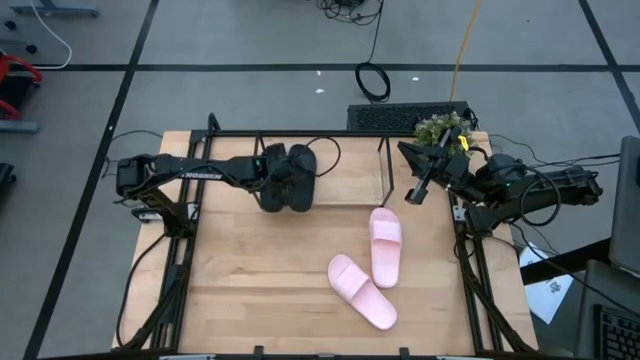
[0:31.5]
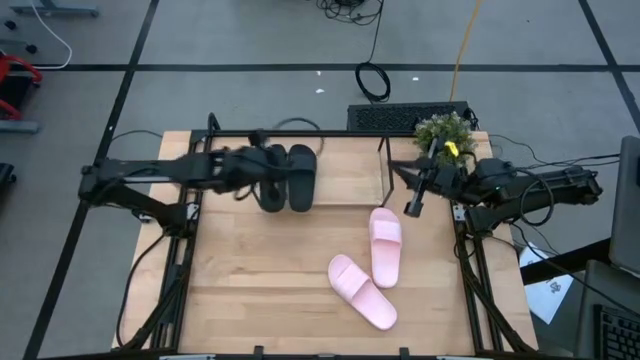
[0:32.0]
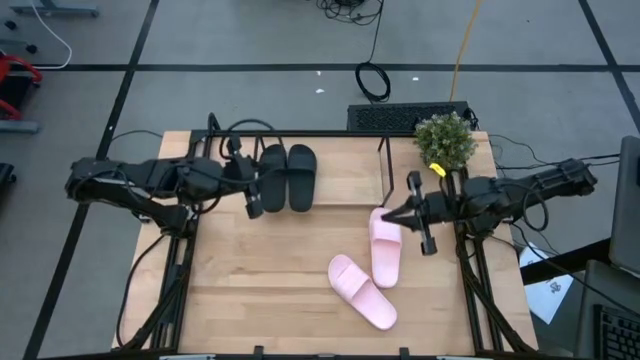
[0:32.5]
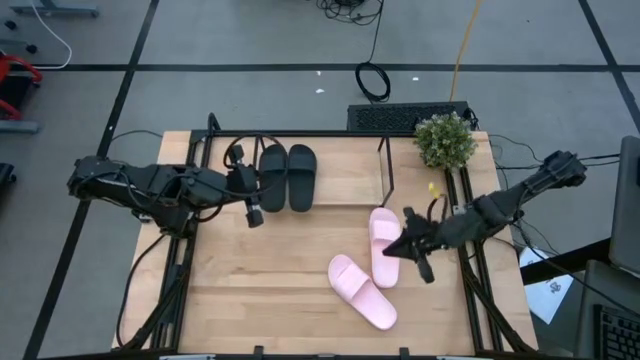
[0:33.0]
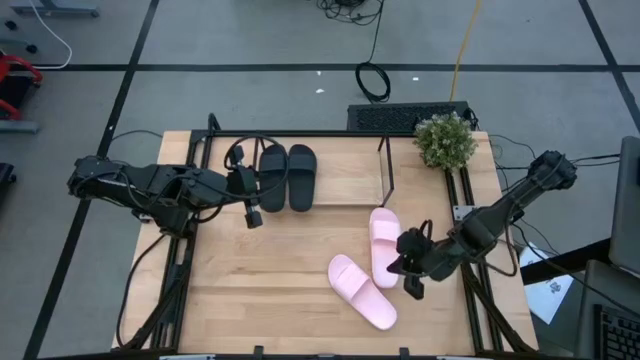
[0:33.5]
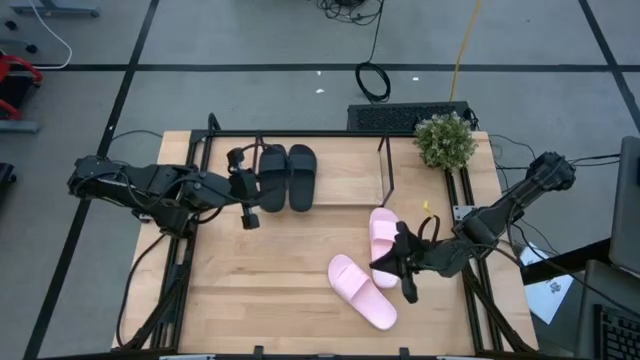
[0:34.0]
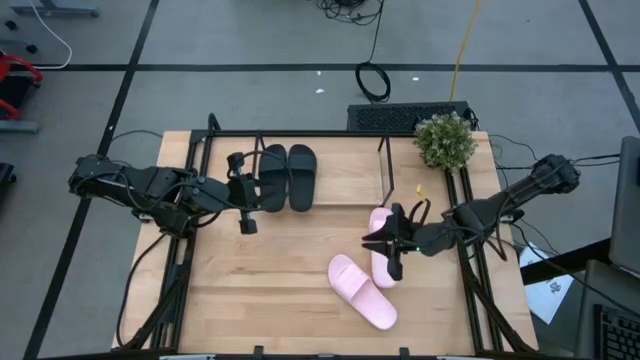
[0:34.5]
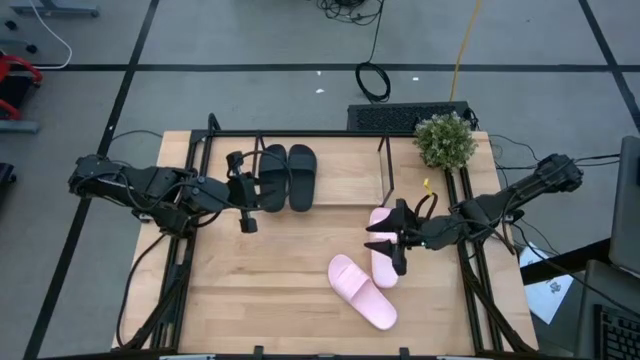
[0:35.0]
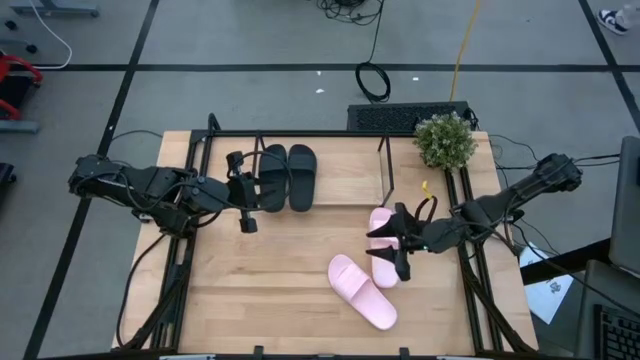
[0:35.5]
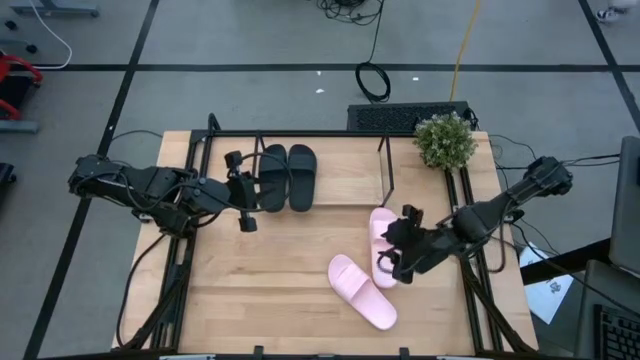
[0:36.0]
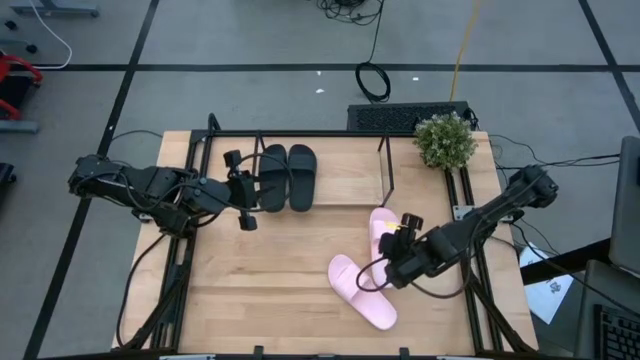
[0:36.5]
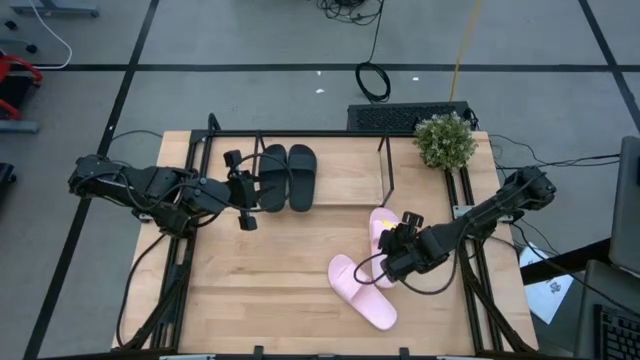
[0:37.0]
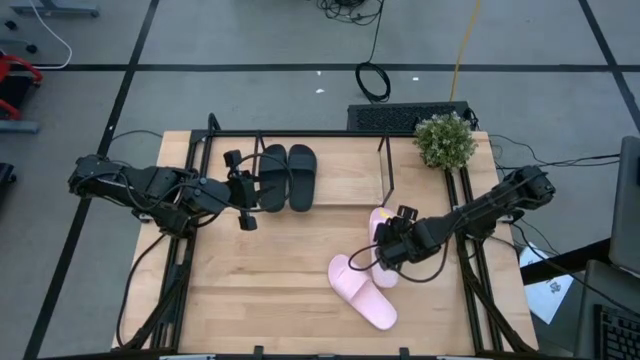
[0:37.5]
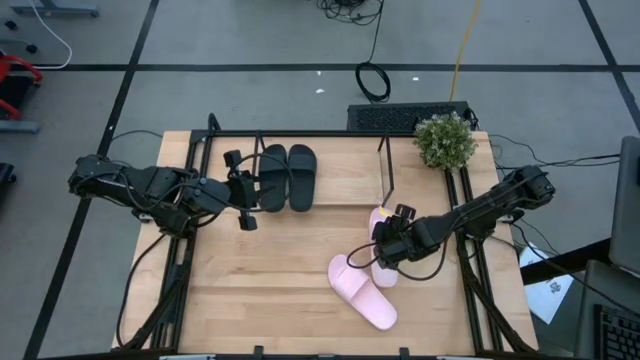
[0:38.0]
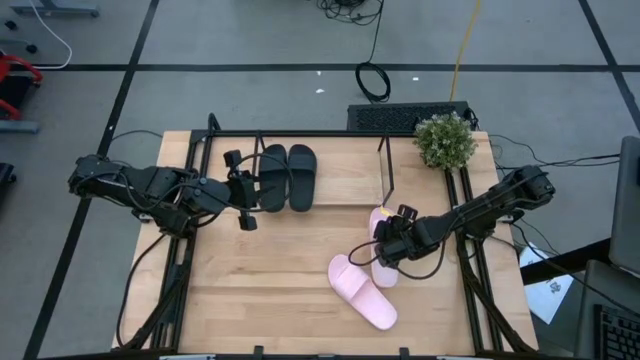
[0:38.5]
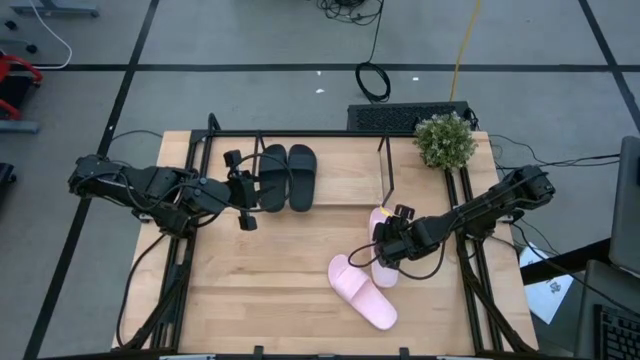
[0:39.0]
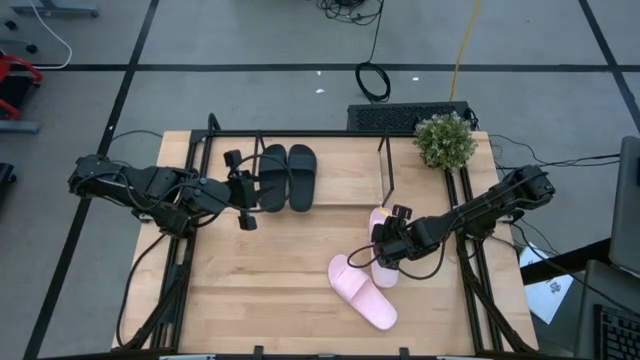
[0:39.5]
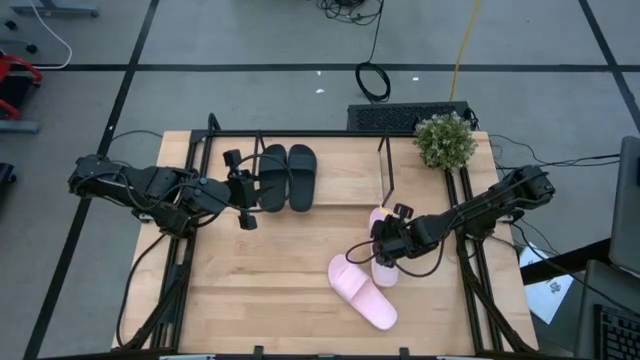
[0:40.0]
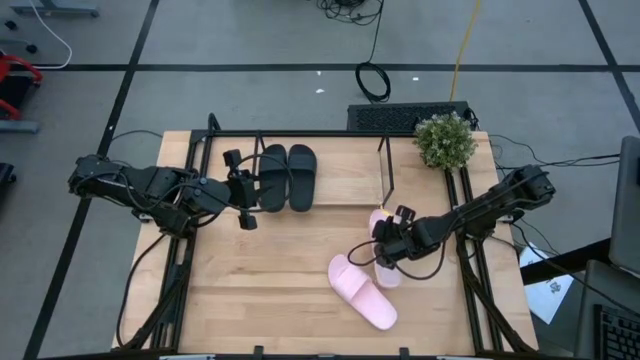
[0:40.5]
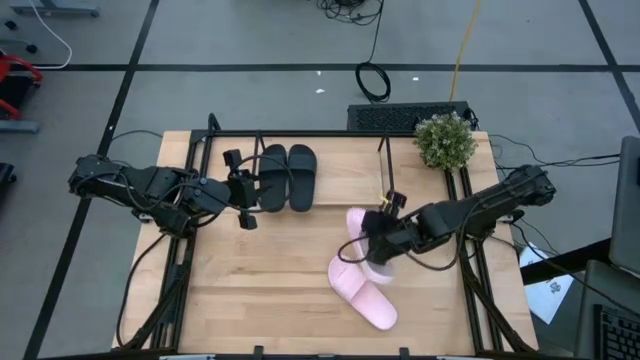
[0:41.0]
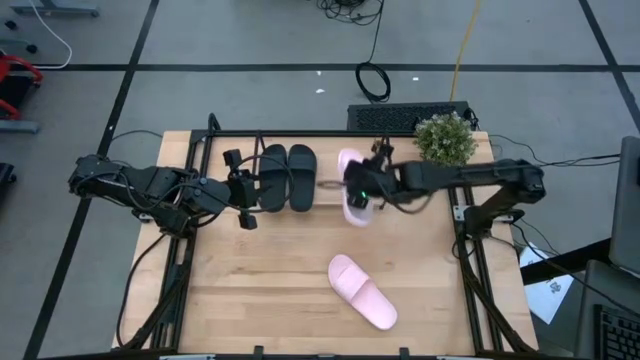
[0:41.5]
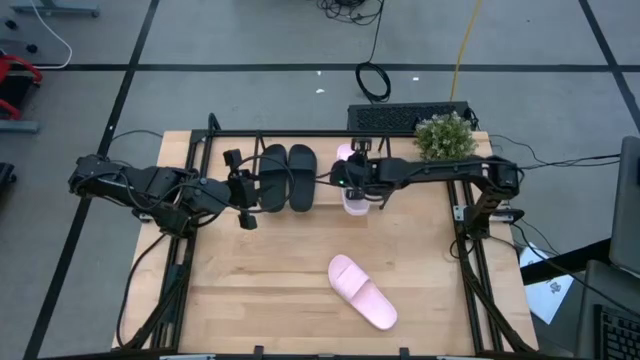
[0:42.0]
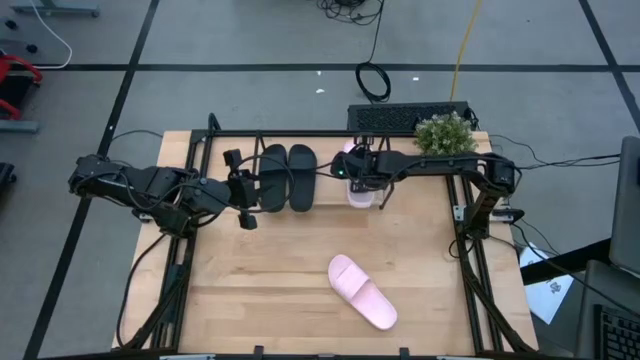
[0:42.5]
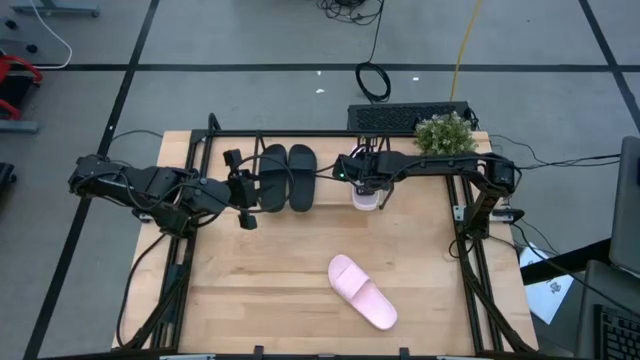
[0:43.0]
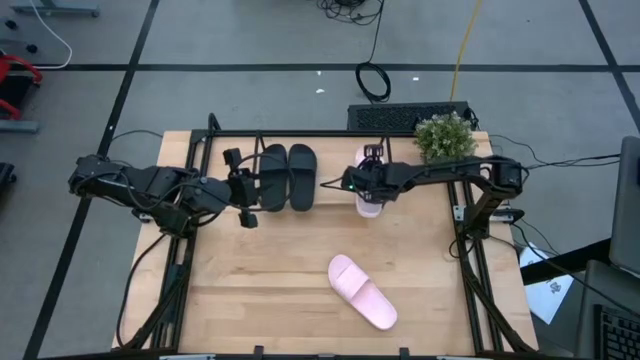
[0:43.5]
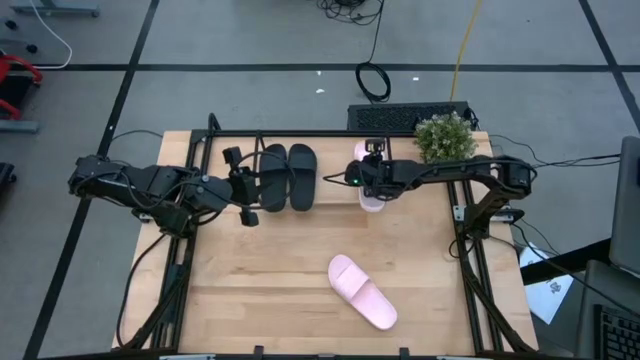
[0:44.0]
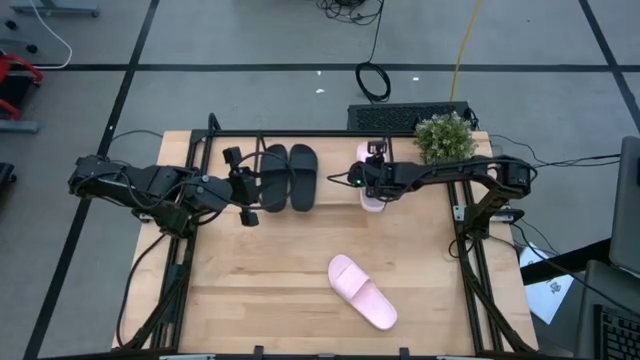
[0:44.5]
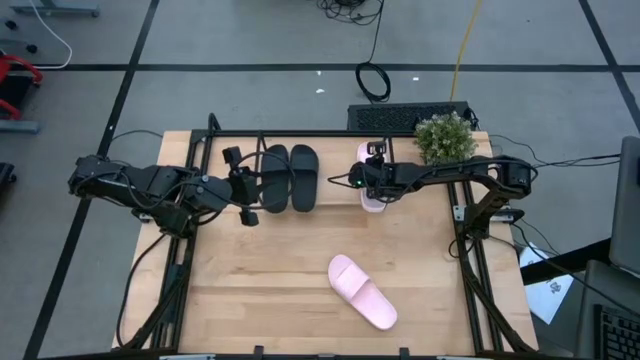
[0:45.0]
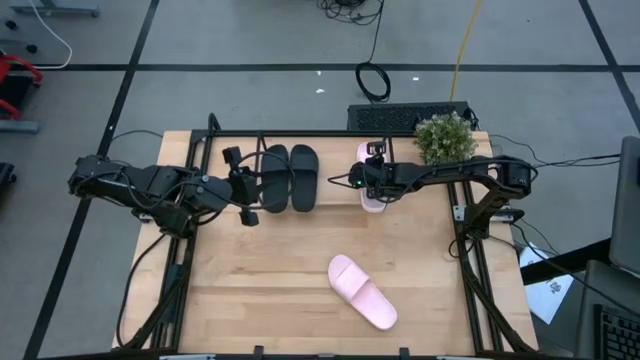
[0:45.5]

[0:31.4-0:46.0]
Task: Pick and place slides into the shelf
Put the right pink slipper on the shelf

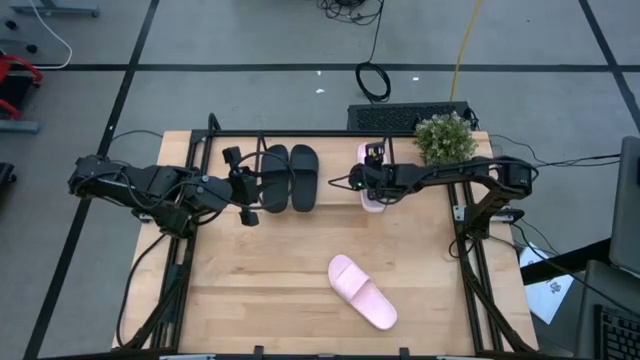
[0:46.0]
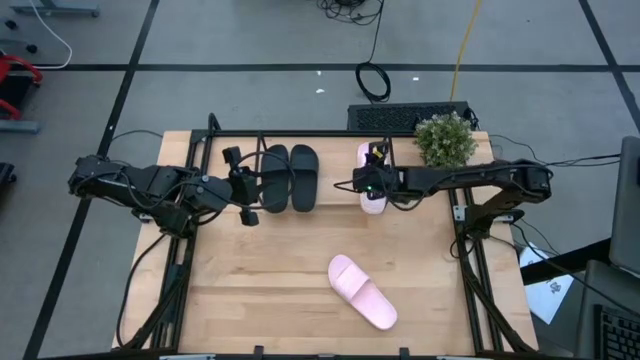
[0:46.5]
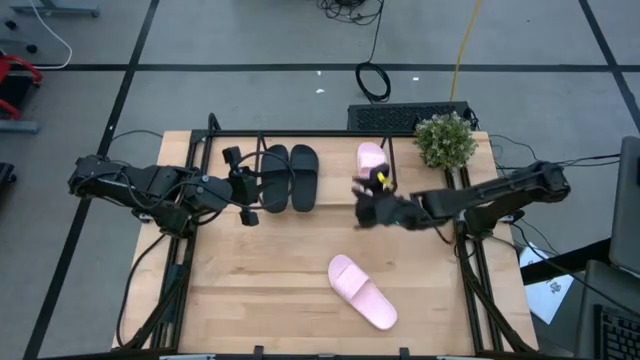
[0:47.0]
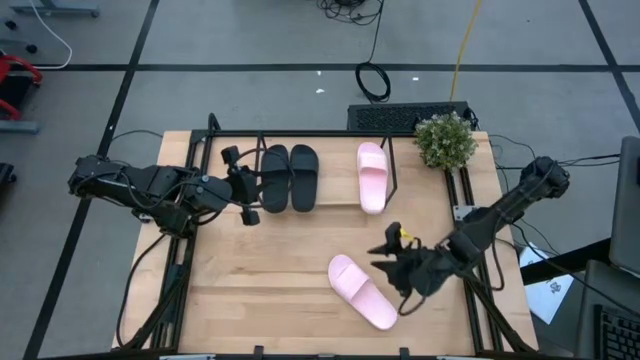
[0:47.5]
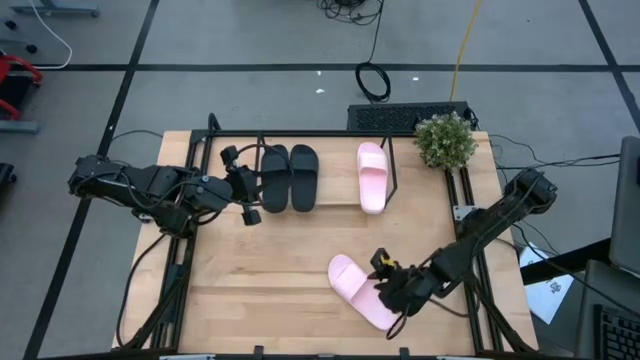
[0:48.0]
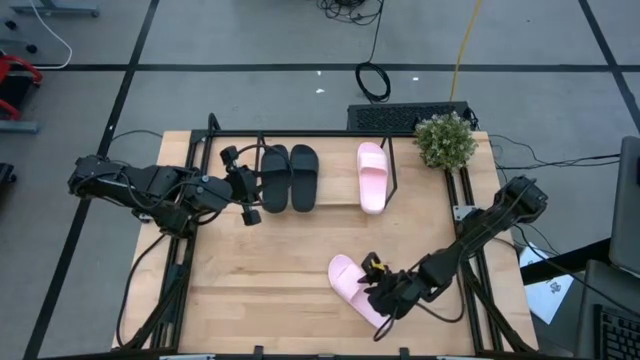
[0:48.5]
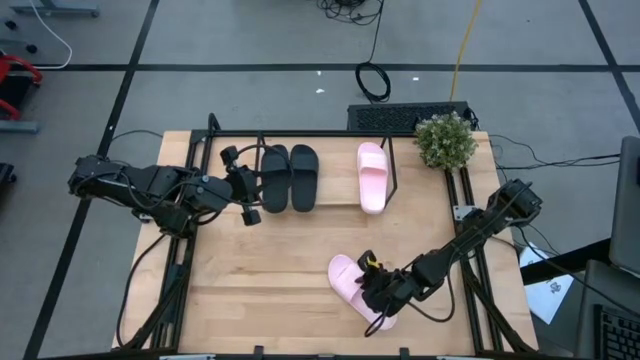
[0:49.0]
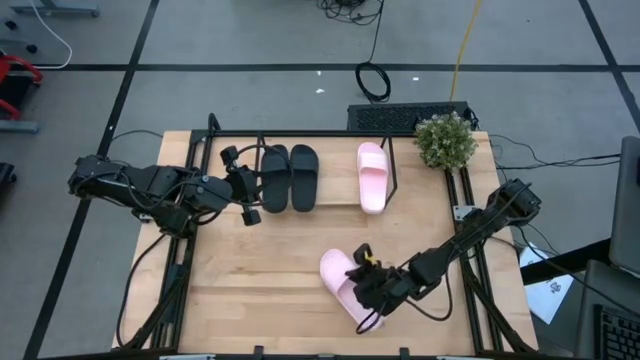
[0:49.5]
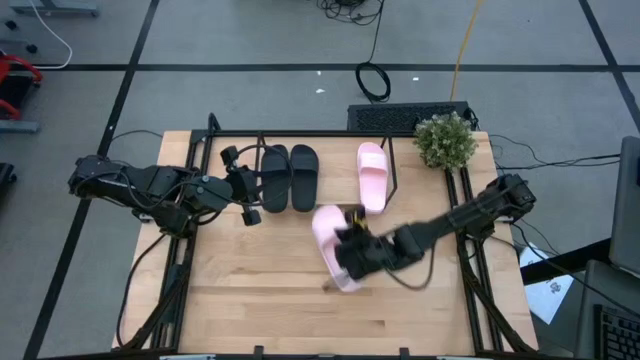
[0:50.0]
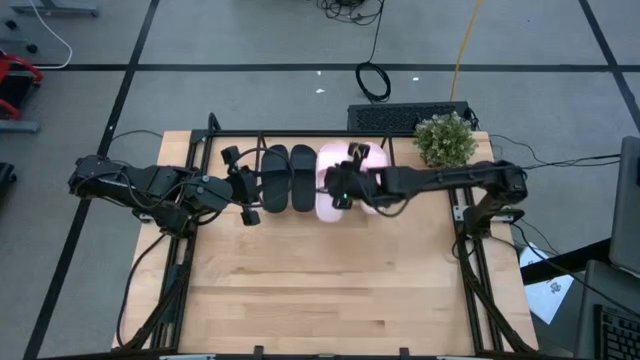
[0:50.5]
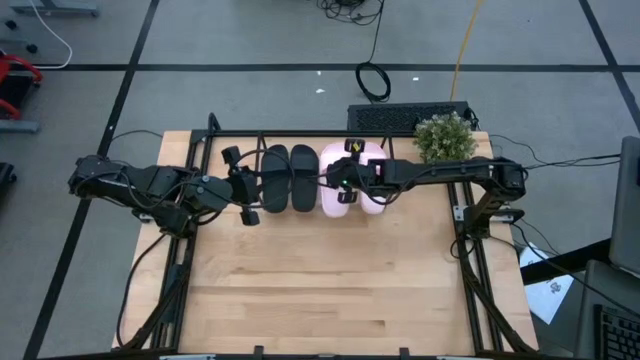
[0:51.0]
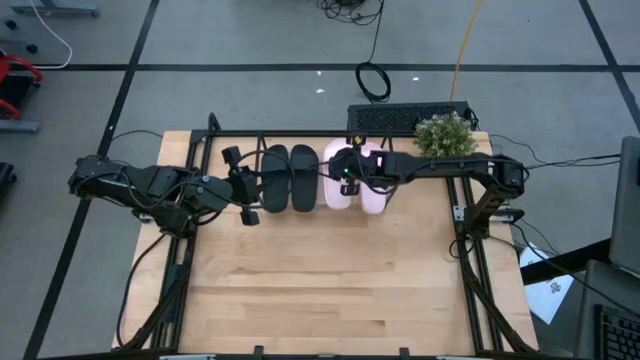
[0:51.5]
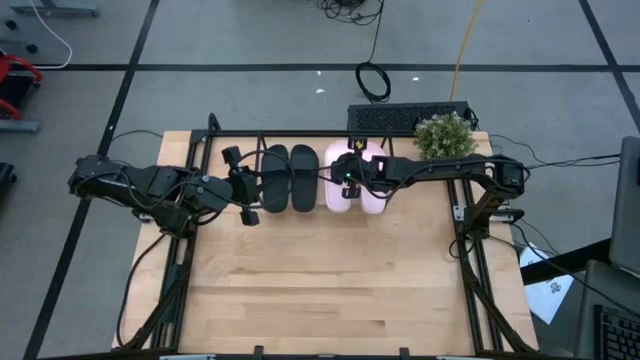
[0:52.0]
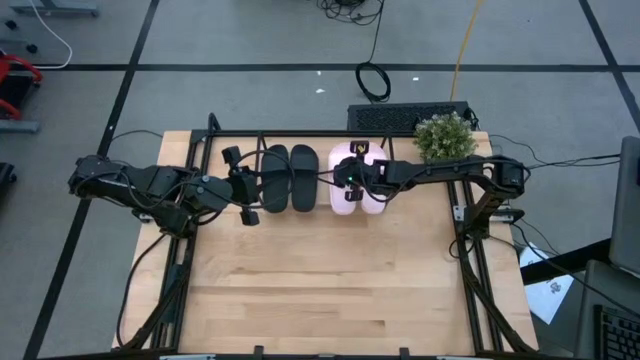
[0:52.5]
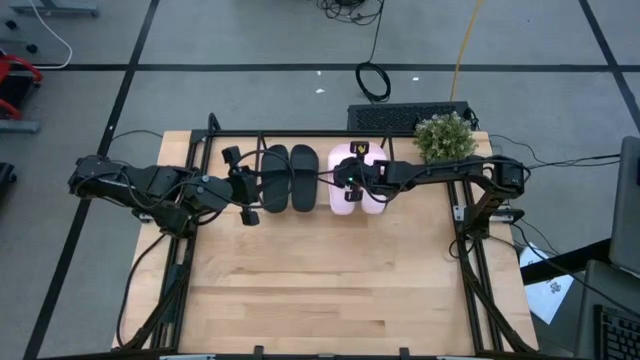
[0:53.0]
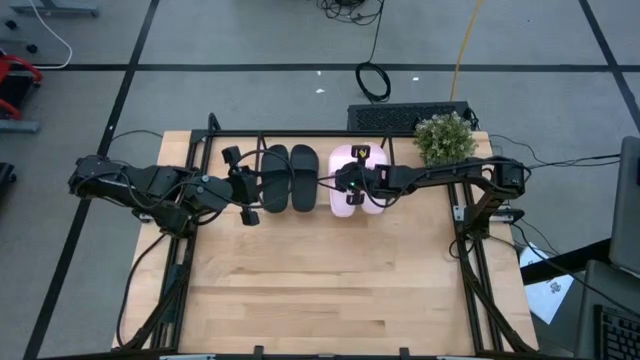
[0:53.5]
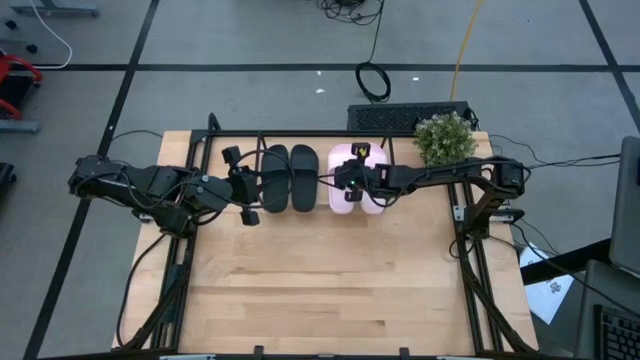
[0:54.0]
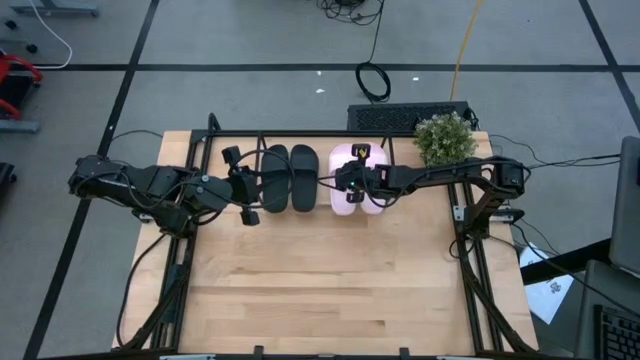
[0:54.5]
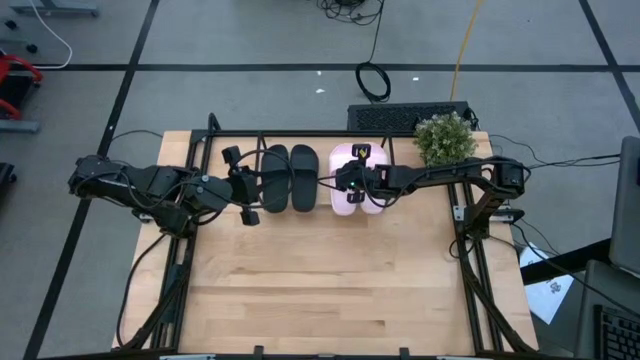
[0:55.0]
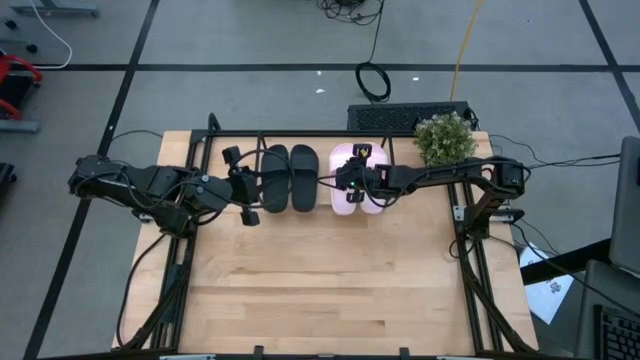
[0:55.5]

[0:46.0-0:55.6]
Put the pink slipper on the shelf
